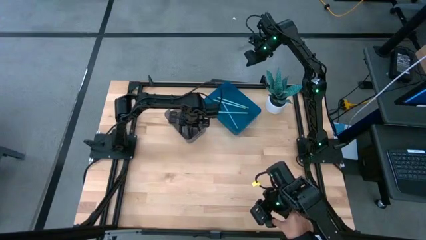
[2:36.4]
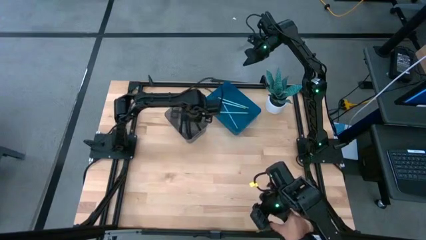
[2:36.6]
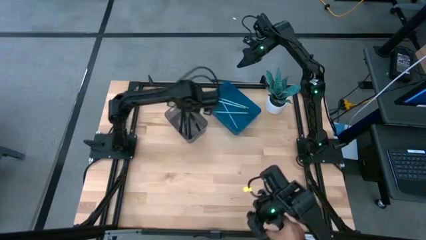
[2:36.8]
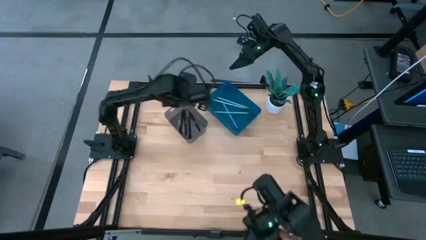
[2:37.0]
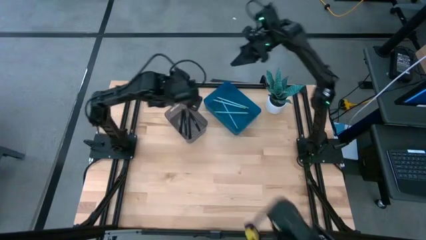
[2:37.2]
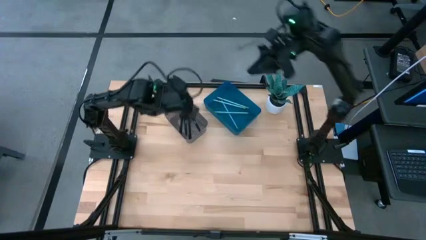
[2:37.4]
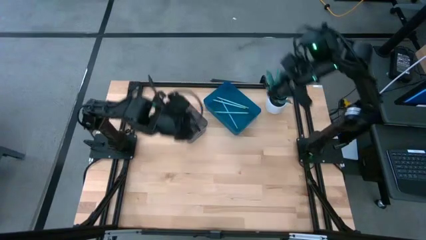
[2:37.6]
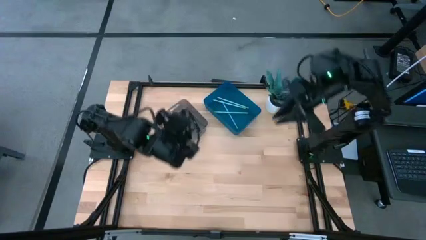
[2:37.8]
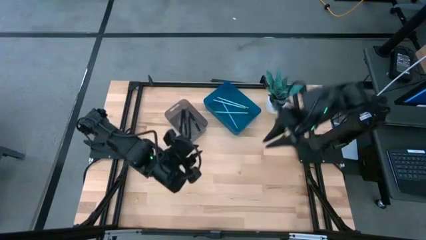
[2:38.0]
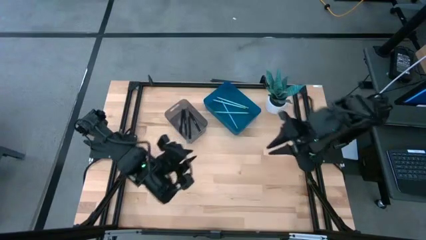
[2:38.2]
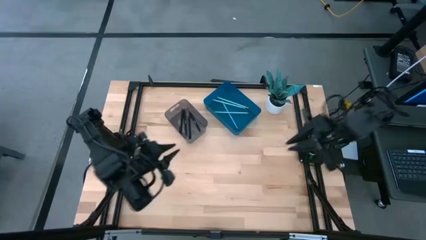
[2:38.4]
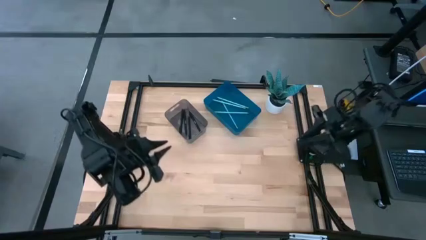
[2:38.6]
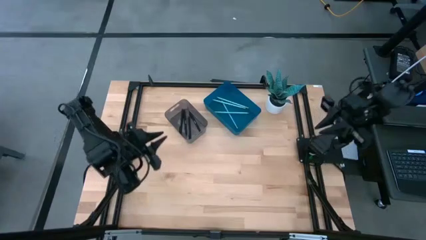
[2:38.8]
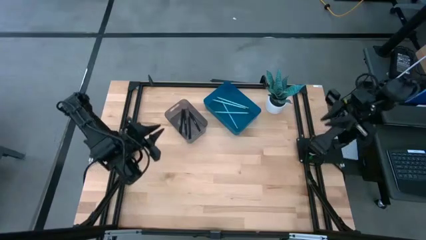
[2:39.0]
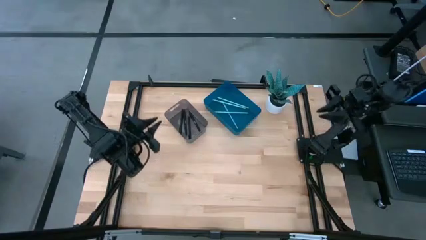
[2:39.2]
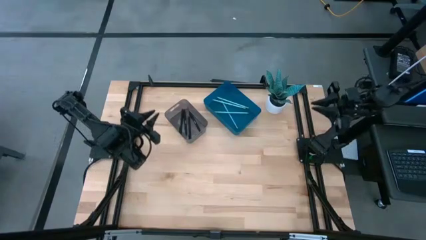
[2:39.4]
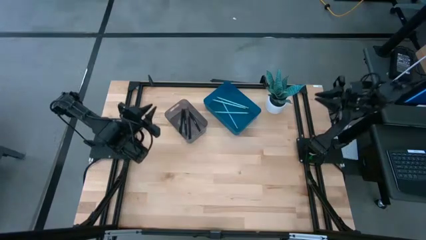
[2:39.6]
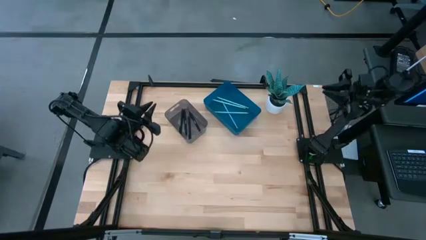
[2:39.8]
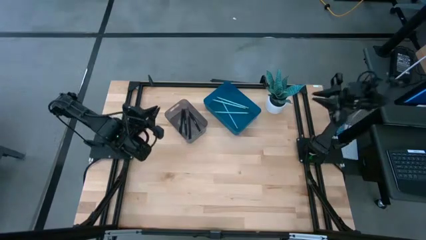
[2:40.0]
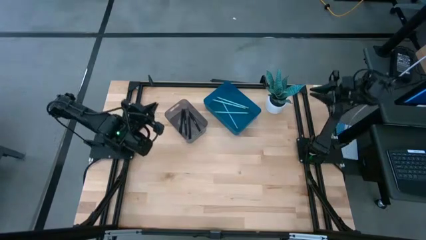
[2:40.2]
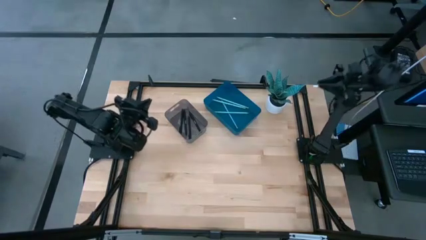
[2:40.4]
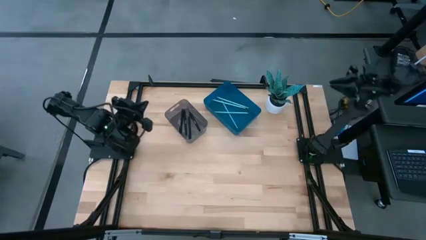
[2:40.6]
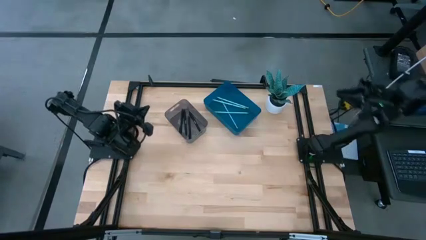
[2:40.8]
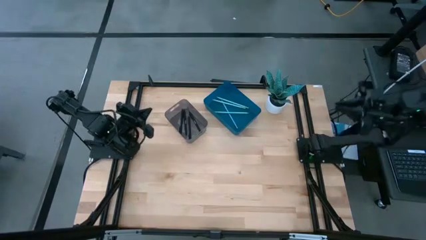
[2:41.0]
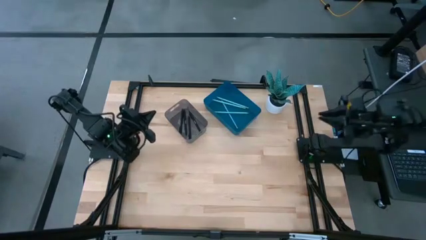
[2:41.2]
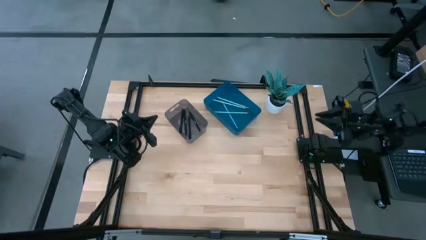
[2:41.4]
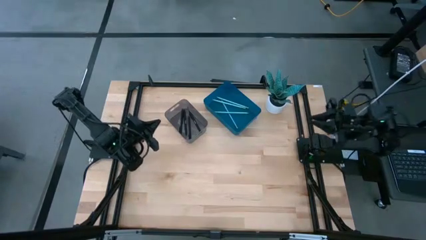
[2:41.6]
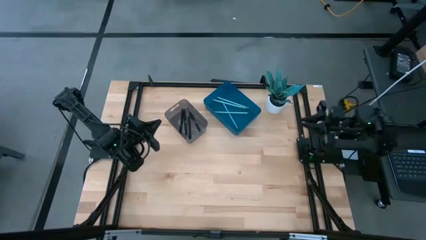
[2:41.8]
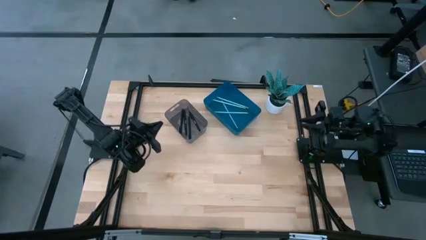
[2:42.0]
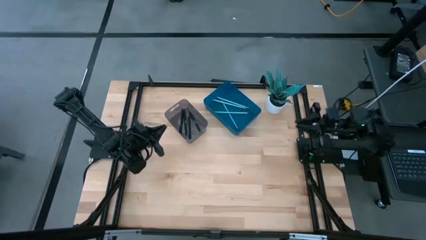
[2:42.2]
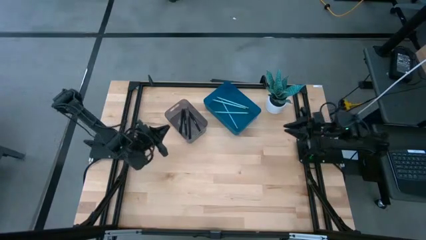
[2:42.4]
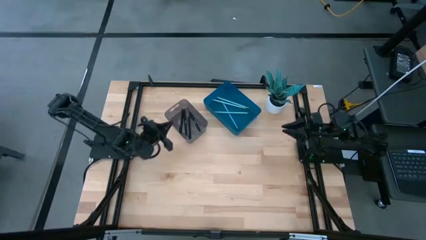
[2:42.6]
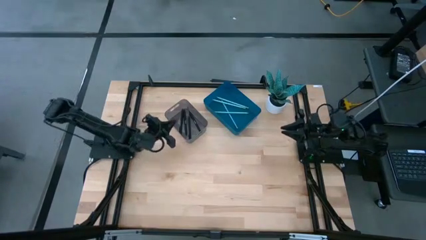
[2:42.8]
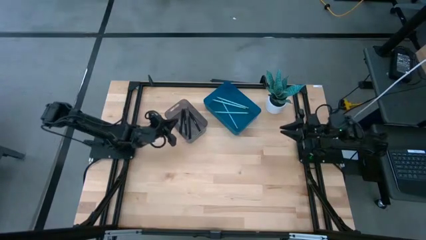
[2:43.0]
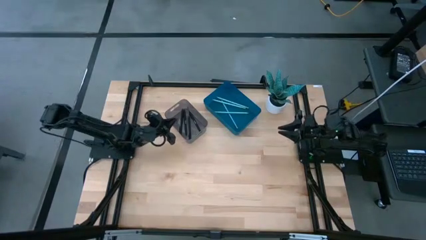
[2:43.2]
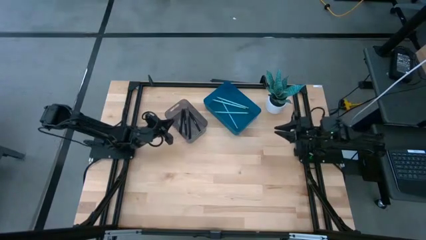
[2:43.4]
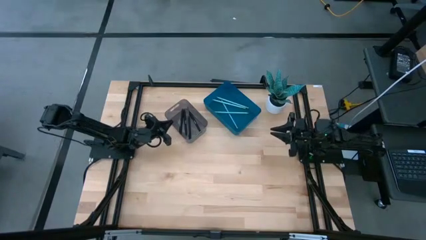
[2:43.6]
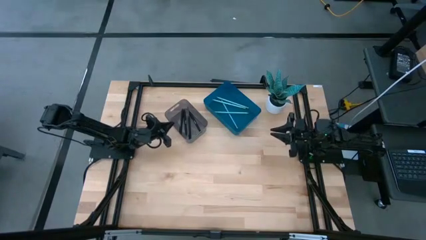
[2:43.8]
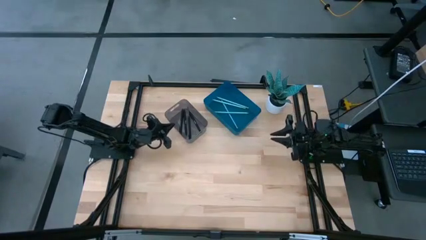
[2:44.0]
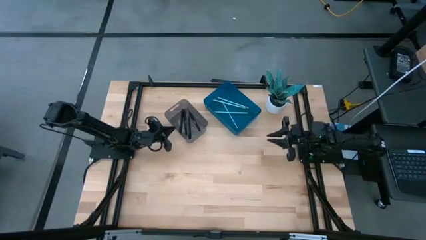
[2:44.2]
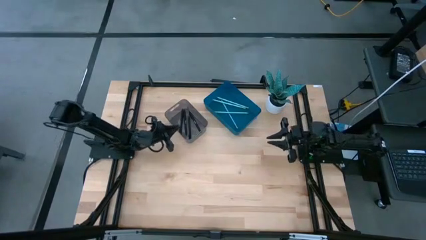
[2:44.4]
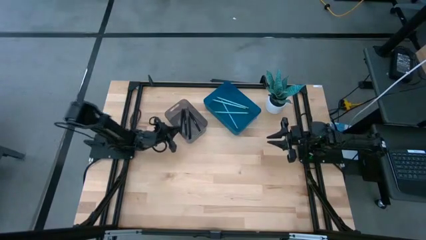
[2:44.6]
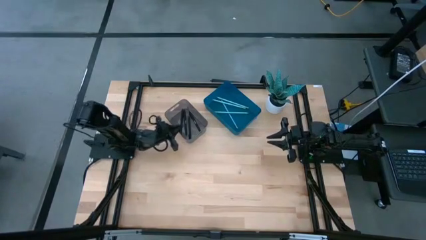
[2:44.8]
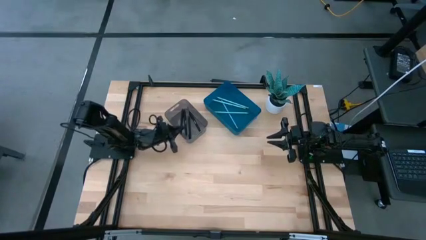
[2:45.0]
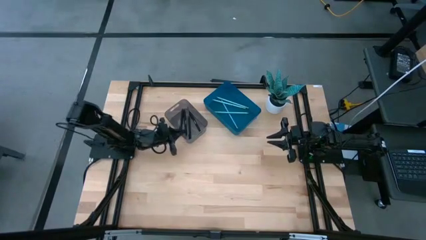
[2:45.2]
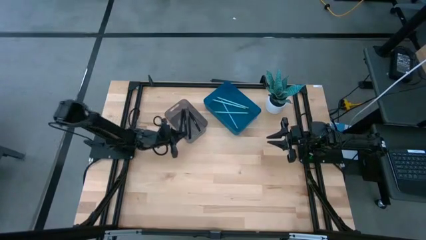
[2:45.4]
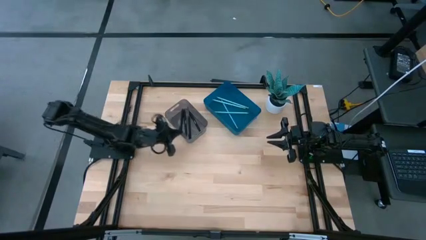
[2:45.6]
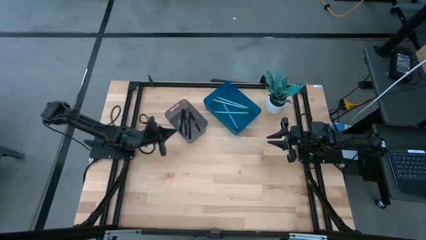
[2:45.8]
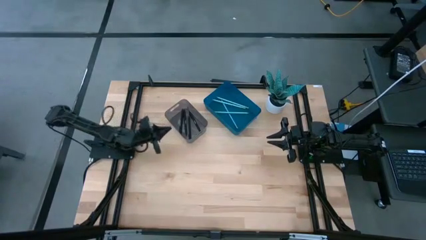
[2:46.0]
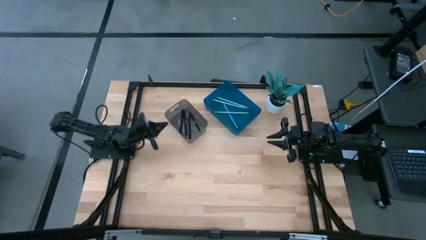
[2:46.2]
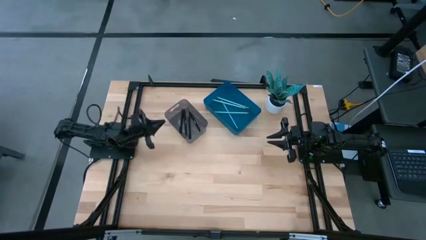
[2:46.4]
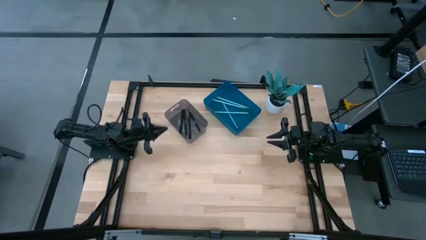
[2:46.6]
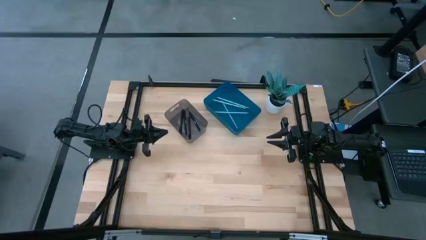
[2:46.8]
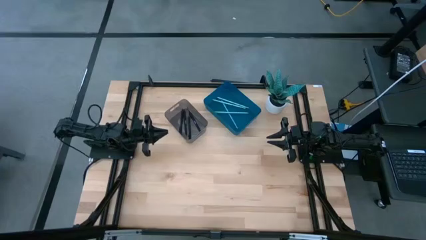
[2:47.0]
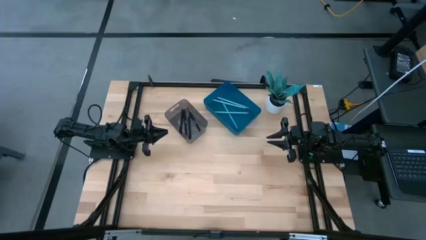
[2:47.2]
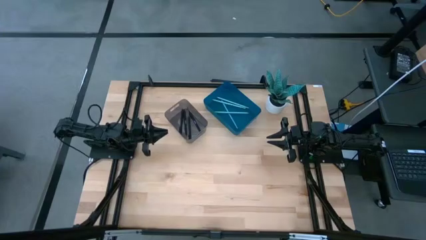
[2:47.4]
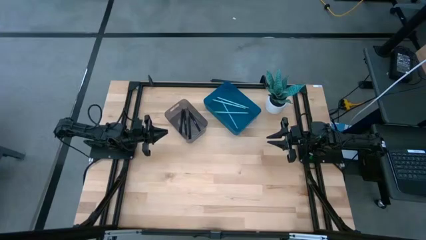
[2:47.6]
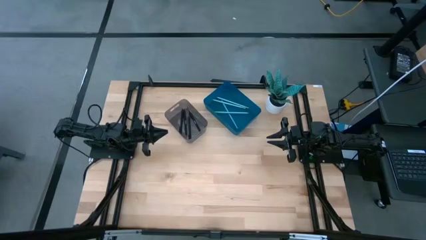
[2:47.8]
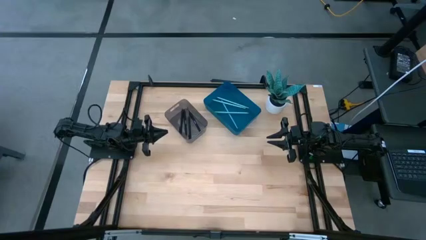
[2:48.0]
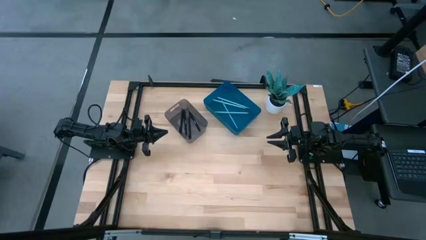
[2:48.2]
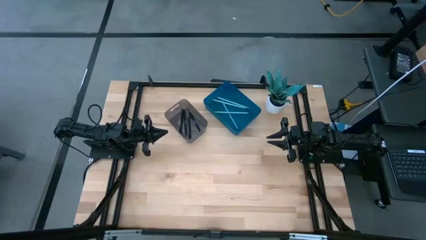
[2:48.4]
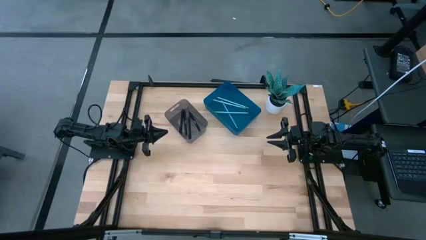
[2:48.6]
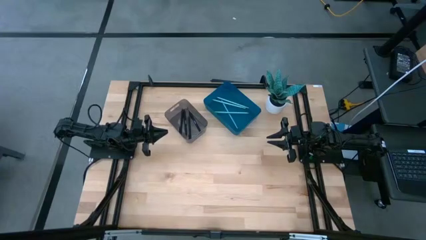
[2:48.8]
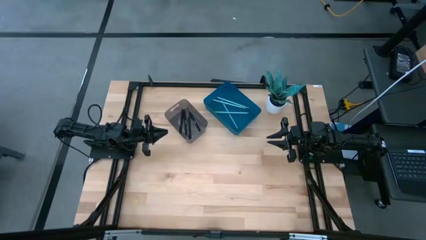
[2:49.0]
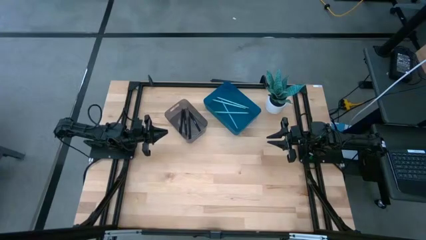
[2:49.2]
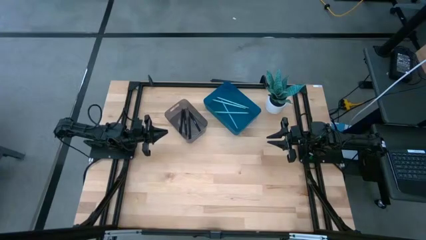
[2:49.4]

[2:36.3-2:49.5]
Task: Sort pens & pencils
Return to Home Position

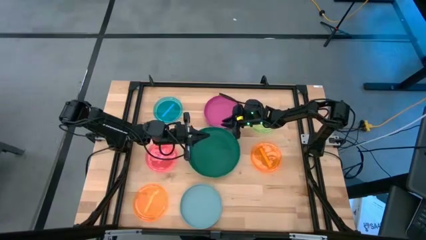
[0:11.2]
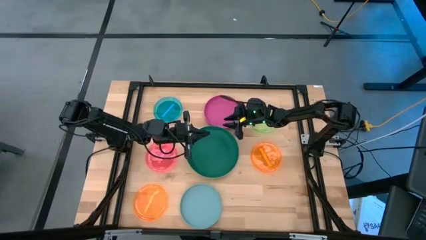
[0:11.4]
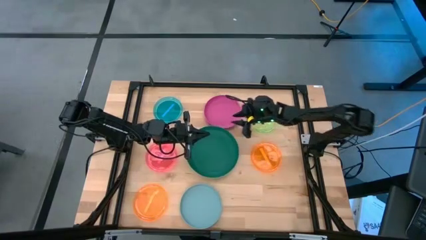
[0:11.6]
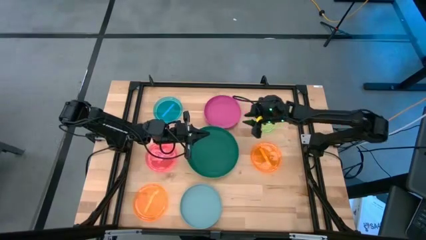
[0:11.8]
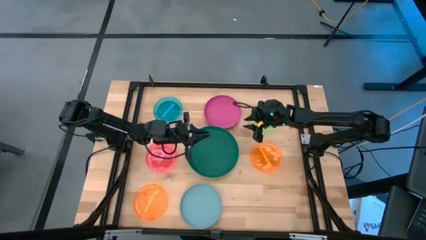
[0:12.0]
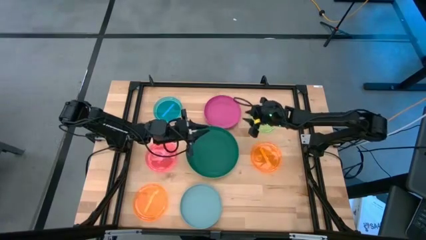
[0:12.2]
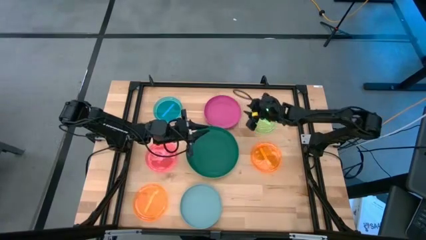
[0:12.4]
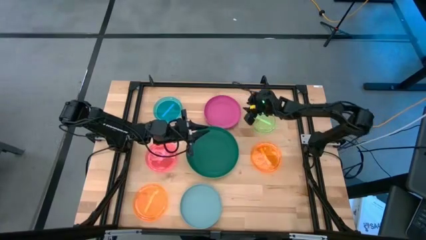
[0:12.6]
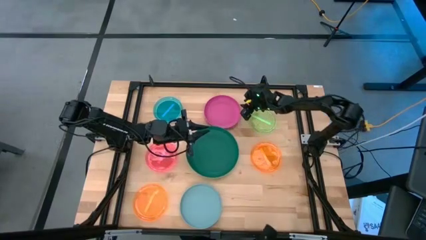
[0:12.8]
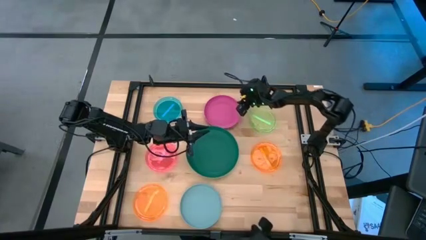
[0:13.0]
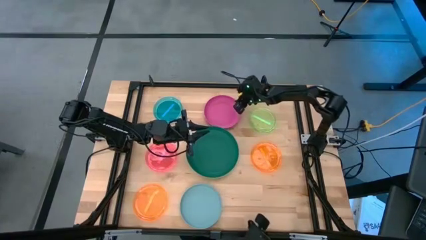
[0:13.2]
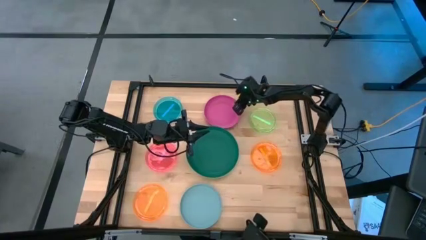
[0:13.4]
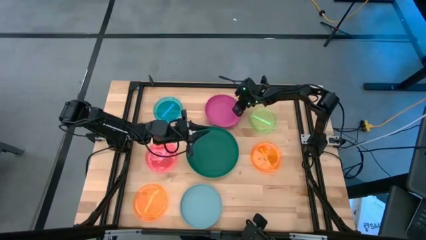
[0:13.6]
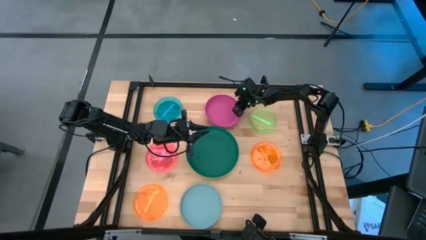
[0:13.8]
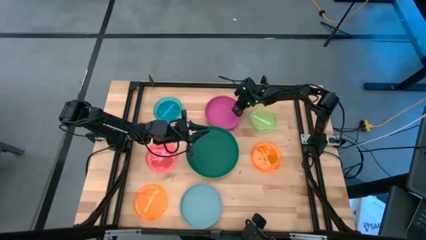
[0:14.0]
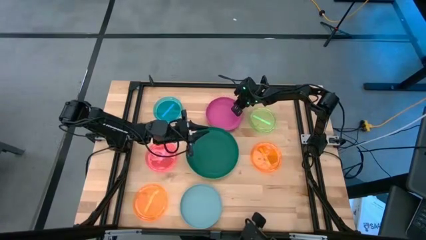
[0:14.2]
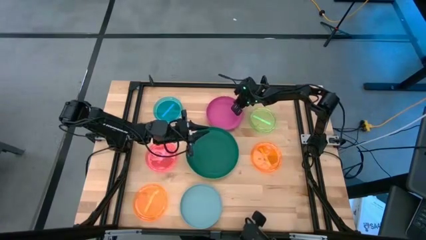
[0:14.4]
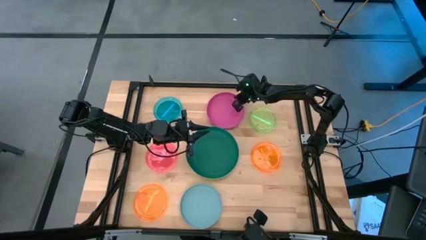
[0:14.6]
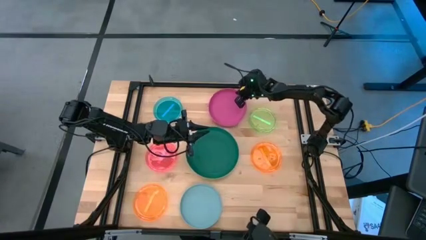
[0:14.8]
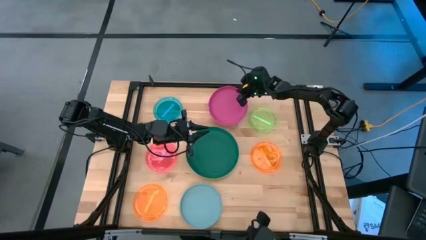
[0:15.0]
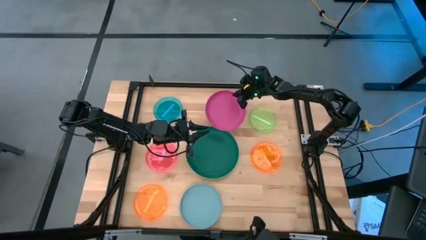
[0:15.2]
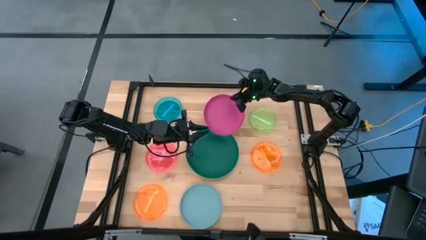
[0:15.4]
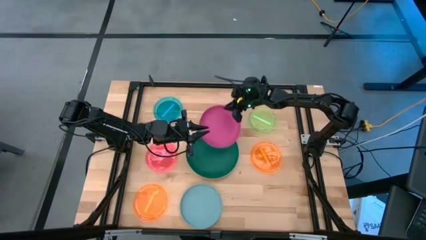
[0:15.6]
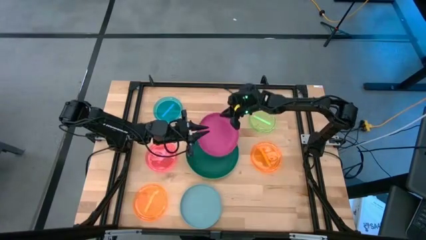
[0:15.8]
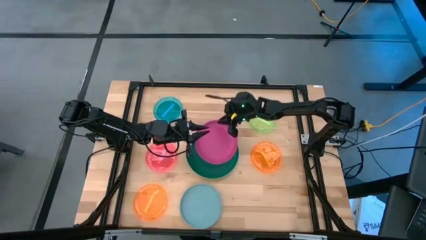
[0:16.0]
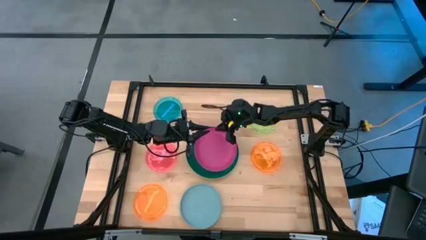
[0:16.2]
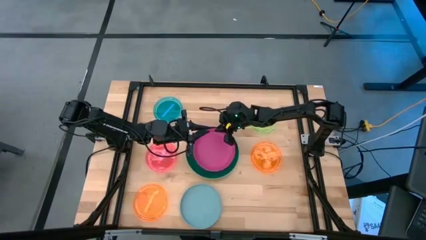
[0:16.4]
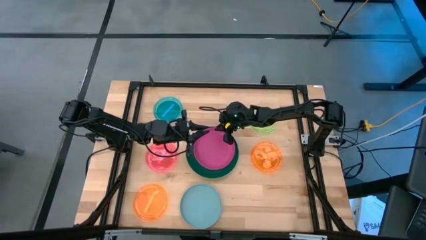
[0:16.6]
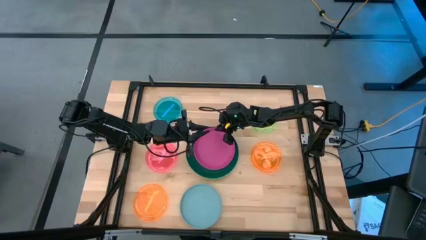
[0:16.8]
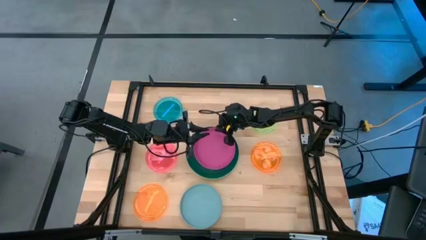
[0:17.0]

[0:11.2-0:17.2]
Task: Stack plastic plates
Stack the dark pink plate on top of the dark green plate
